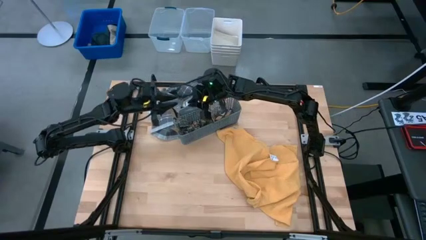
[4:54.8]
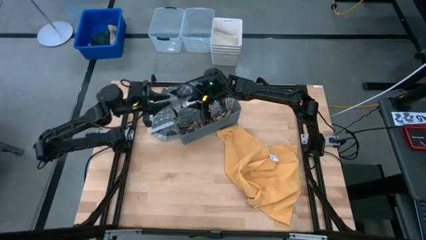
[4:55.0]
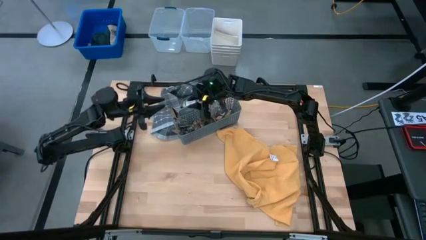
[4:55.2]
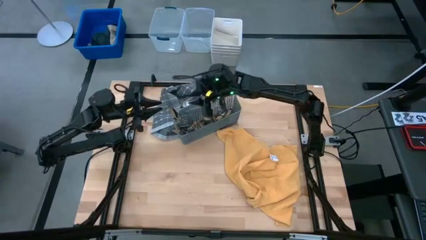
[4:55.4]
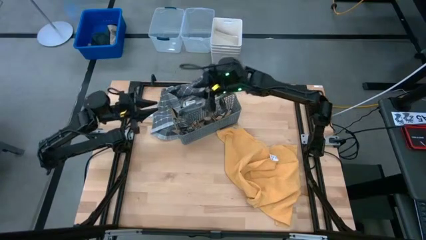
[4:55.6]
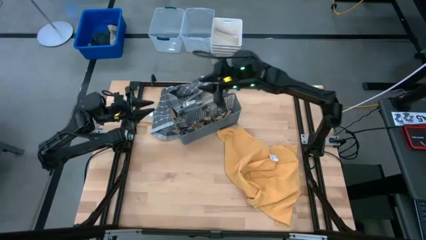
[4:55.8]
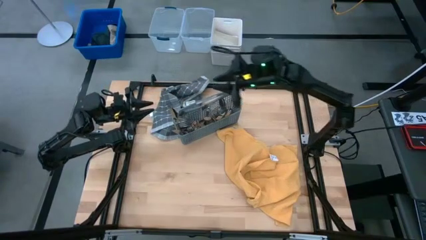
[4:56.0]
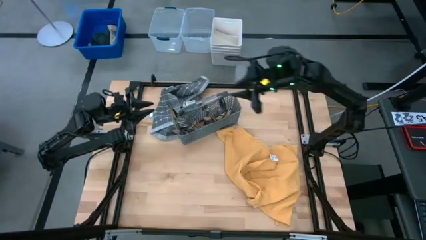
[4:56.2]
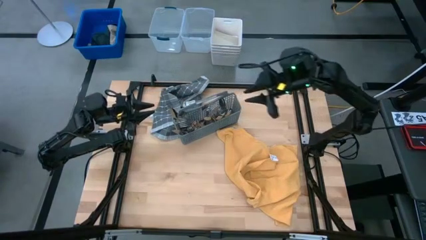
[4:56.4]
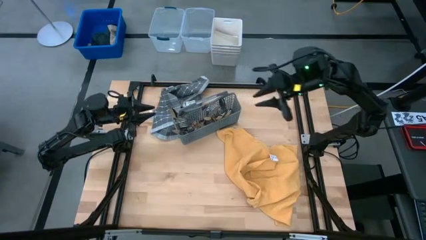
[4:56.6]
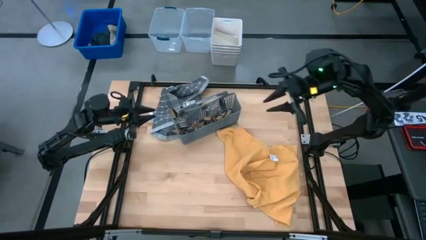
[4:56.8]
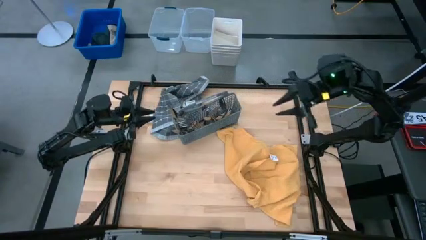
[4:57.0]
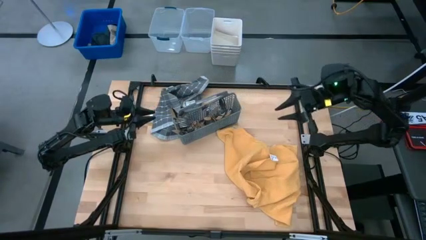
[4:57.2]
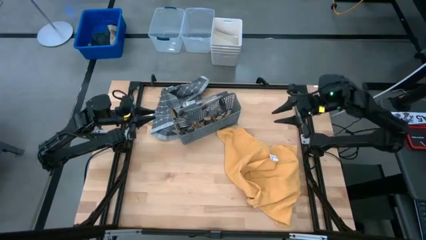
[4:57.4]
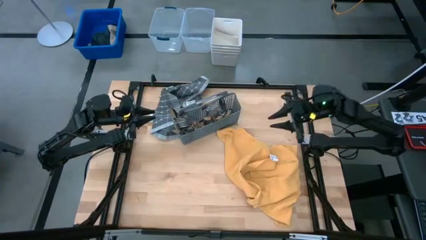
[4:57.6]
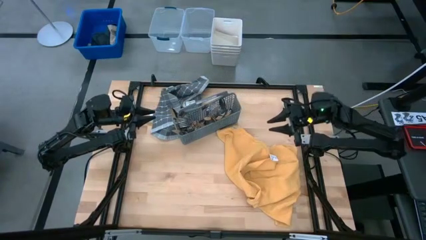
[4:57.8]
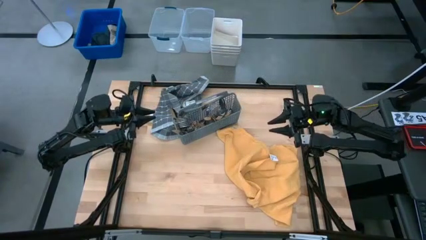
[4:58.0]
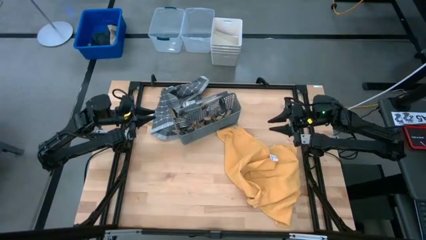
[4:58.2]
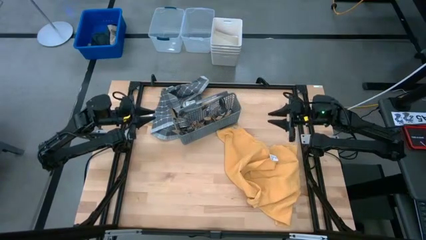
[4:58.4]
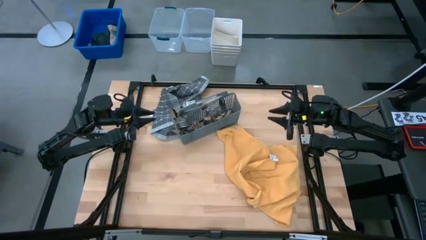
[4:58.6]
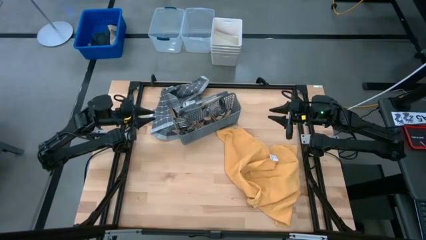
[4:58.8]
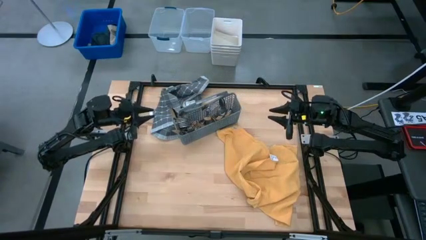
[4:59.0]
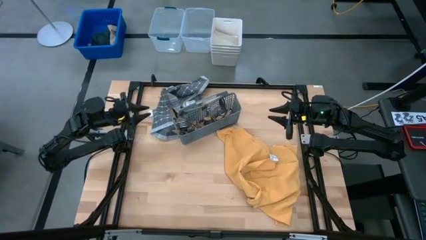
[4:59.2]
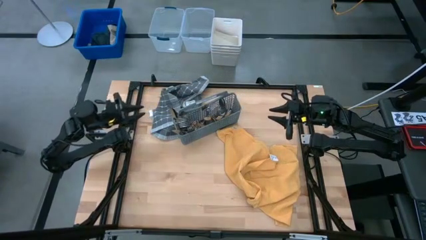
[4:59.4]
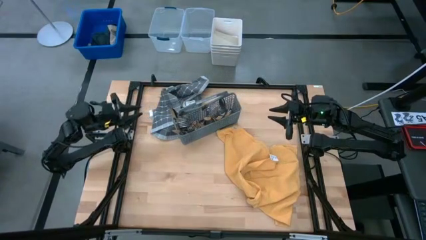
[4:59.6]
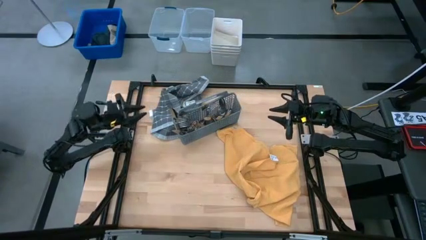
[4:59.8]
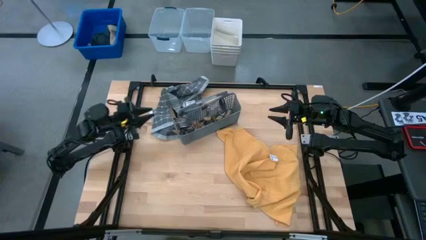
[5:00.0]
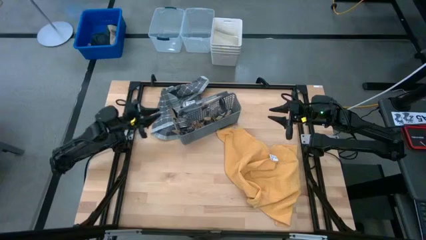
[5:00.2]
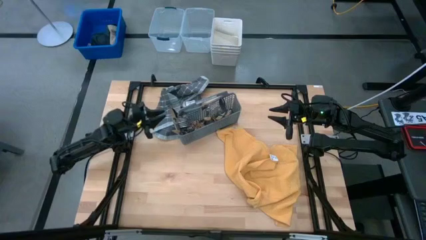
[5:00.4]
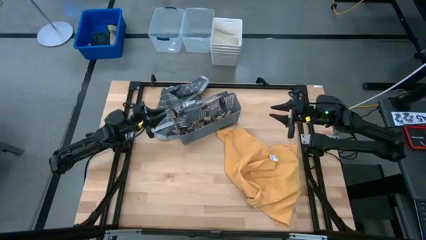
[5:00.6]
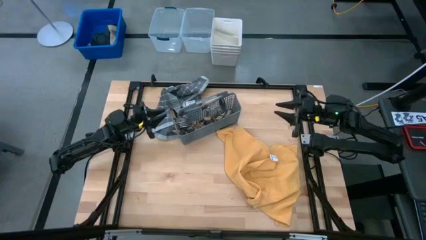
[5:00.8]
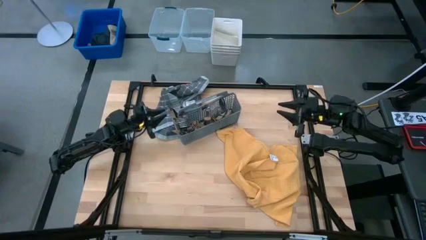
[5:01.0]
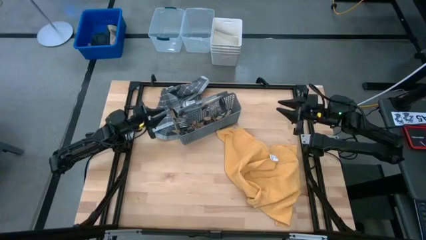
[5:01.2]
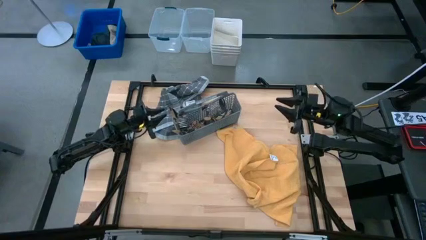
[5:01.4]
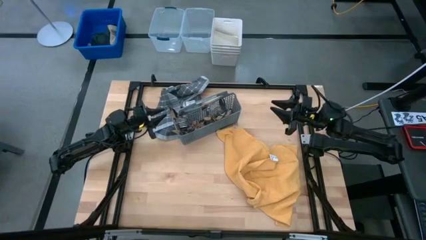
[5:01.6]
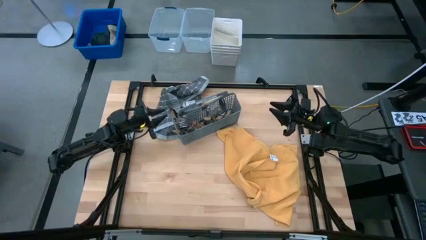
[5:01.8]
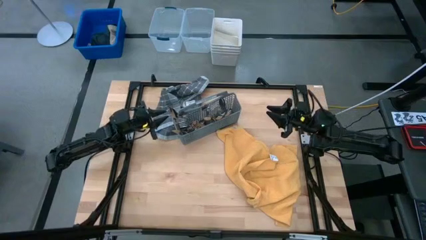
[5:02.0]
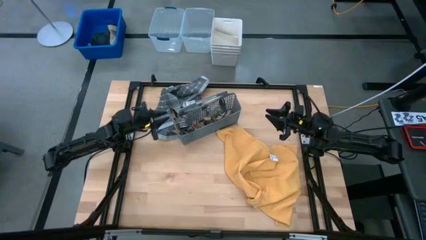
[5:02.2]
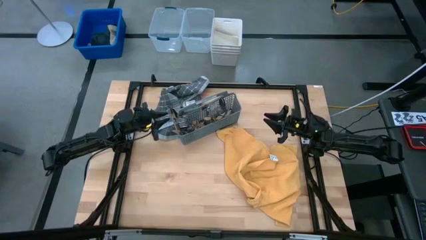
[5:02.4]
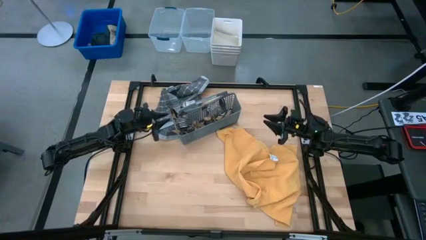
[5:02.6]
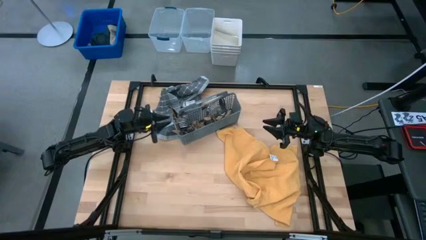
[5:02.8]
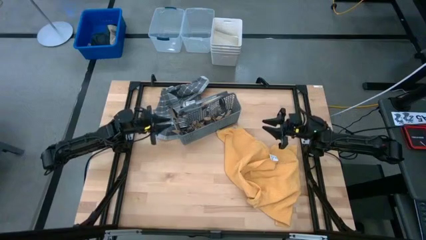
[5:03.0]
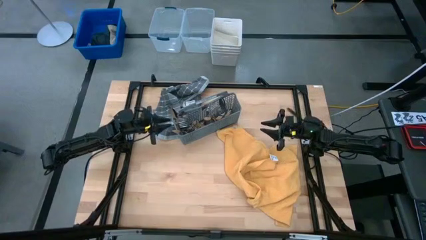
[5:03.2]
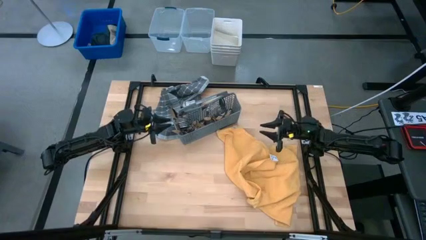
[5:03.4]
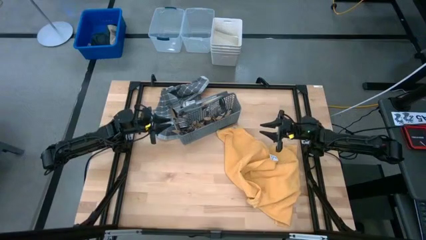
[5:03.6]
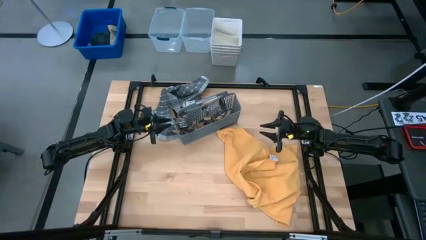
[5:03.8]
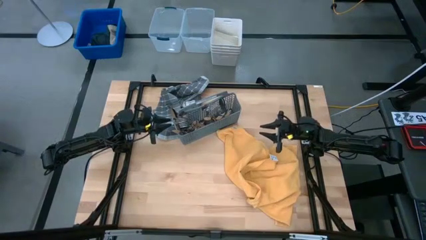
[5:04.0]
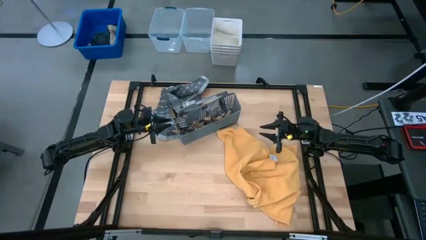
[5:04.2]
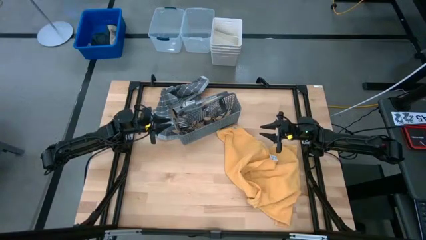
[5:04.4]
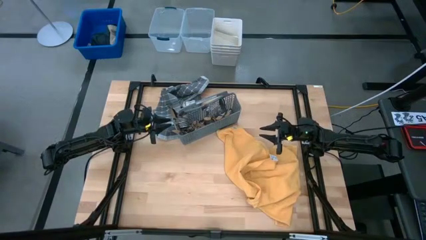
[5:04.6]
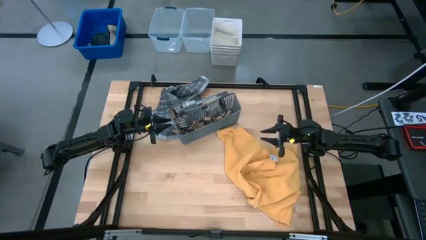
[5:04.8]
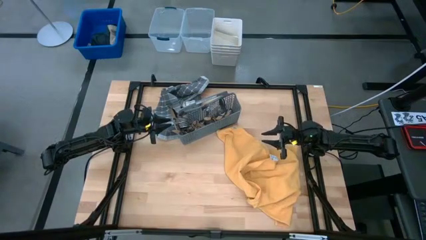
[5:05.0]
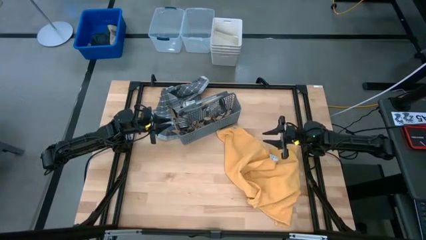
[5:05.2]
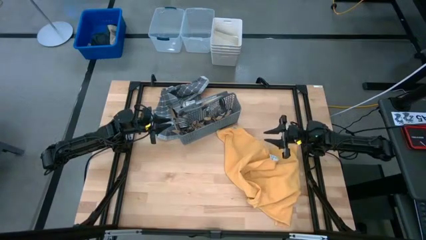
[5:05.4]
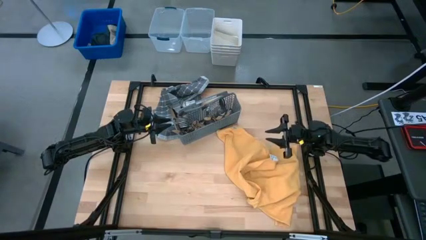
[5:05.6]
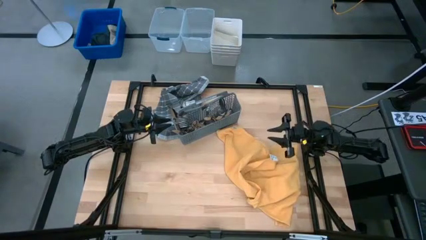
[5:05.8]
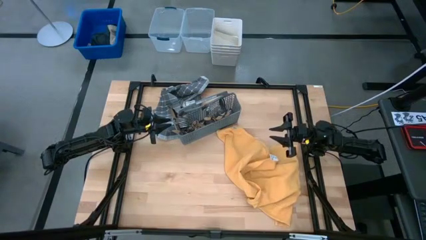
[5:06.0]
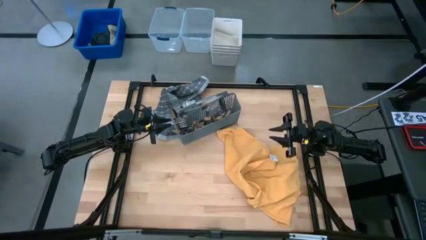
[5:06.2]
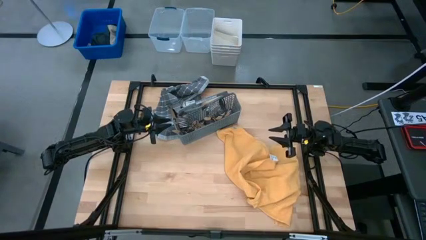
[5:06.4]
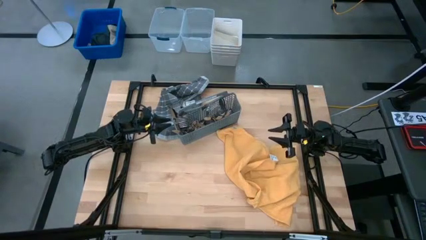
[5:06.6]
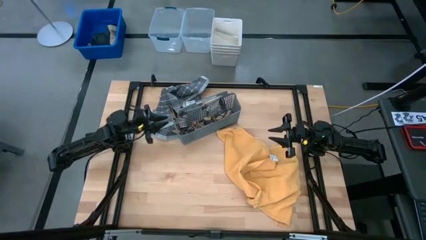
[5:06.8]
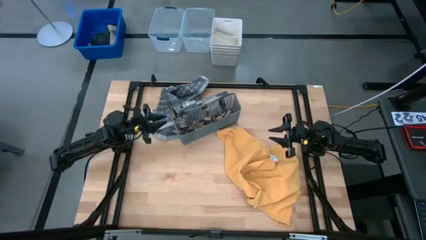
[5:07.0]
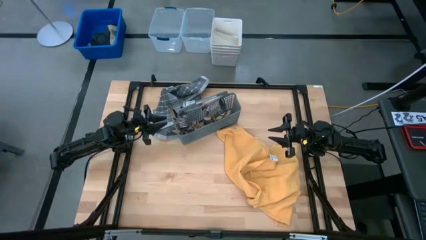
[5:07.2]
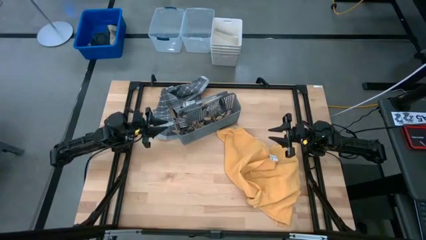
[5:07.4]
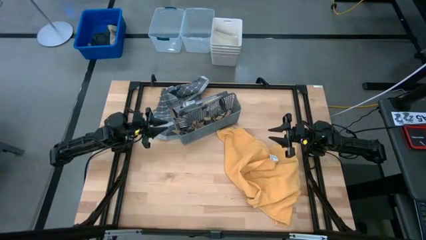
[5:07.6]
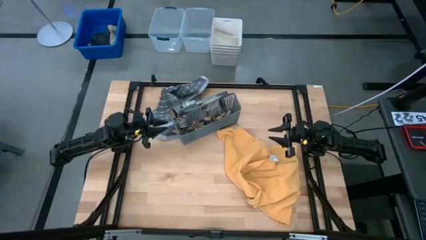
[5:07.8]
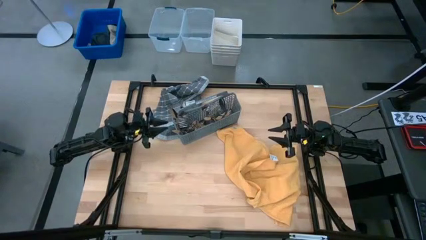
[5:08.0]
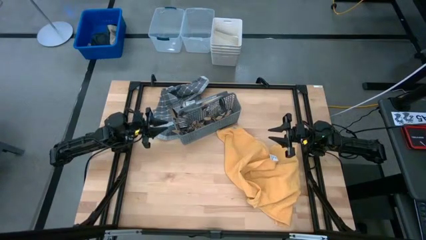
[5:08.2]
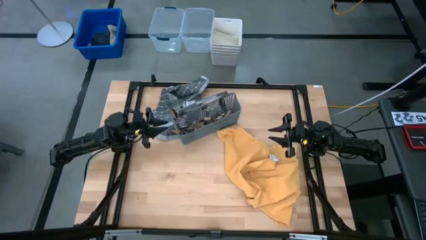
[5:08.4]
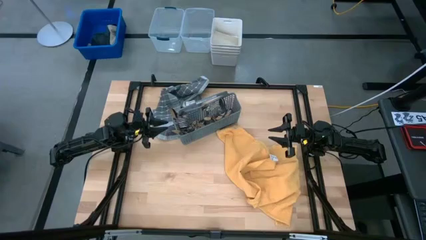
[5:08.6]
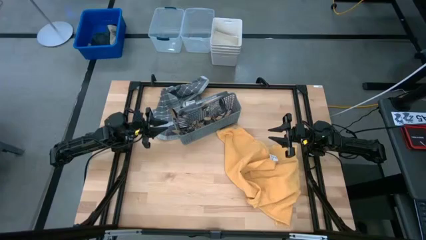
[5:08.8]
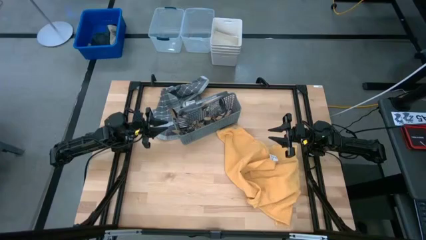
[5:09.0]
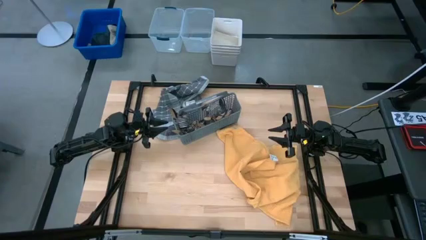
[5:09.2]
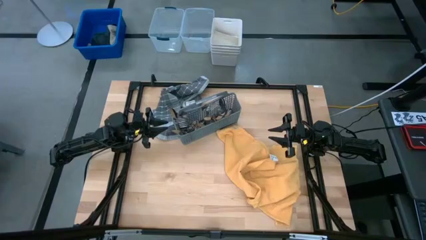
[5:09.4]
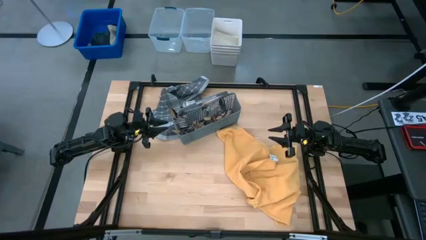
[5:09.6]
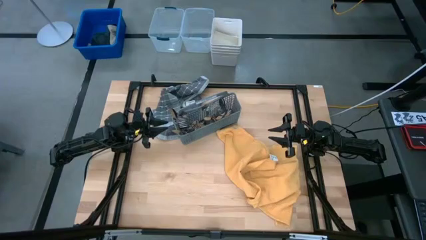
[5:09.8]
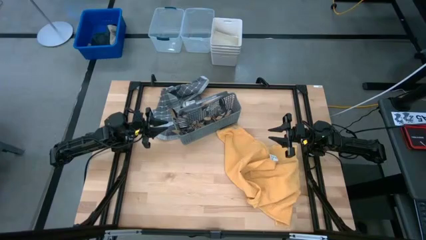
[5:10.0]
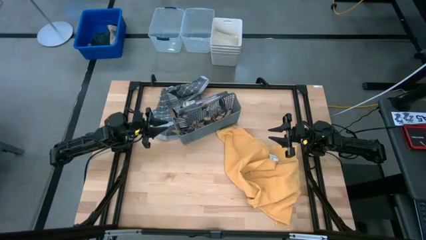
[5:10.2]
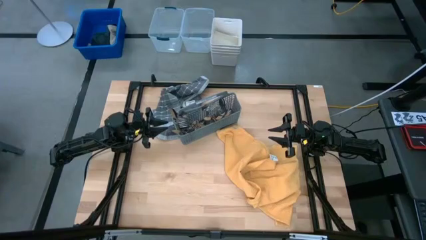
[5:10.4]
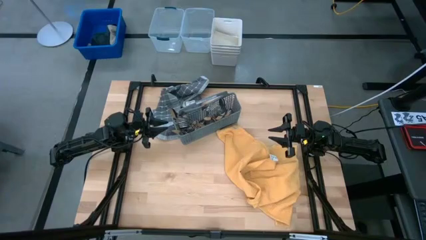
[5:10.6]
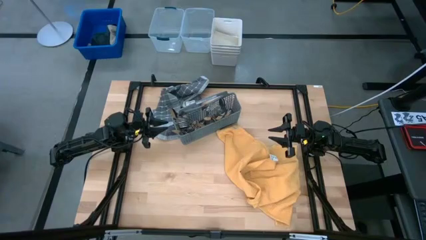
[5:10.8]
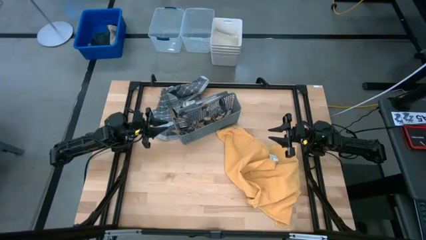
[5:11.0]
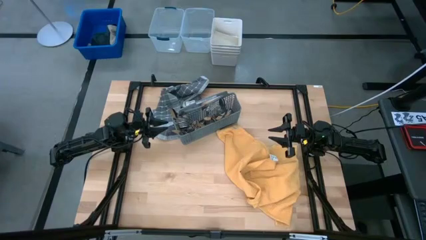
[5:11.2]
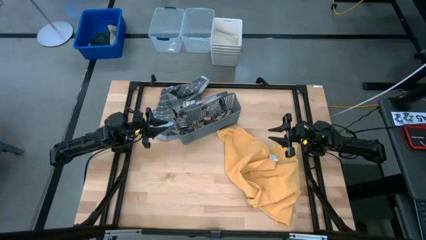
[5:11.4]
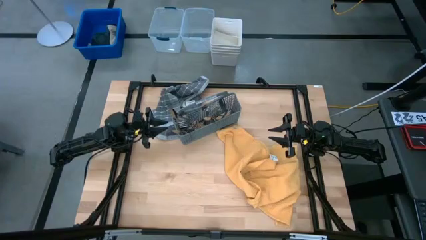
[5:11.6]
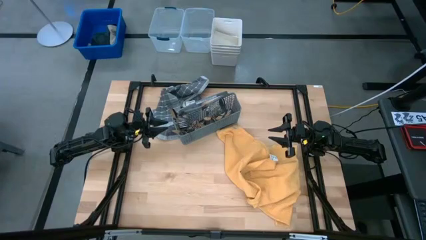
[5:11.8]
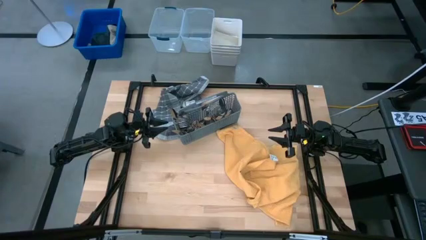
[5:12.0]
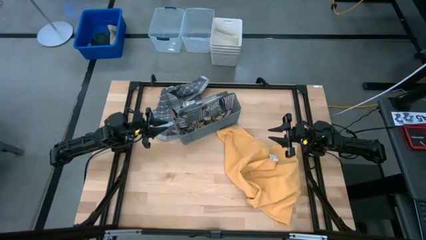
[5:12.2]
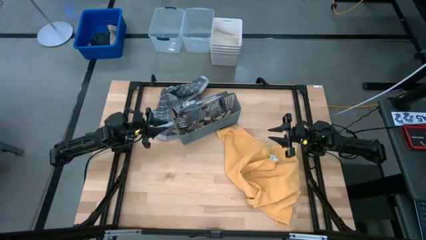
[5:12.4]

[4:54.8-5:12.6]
Task: Sort silverware
Return to Home Position
